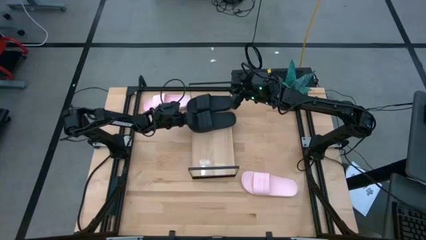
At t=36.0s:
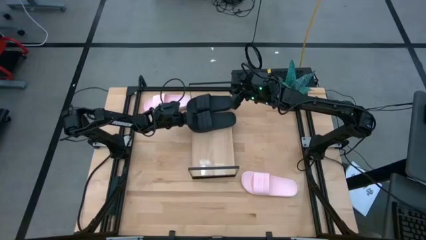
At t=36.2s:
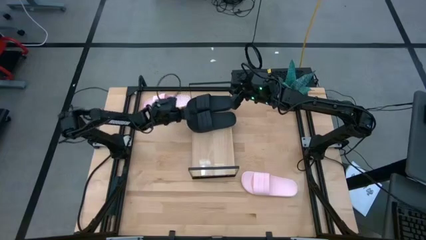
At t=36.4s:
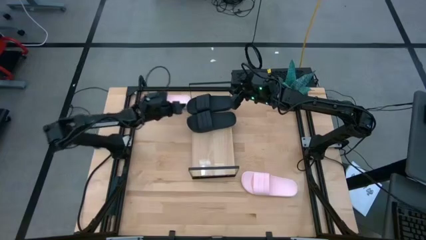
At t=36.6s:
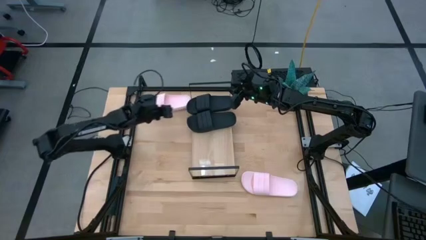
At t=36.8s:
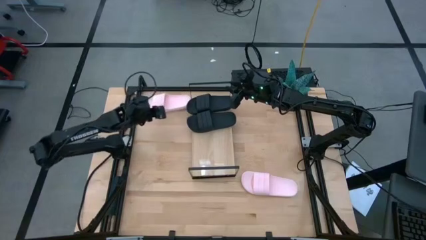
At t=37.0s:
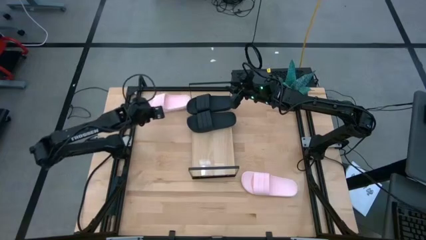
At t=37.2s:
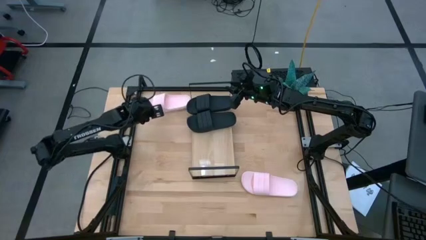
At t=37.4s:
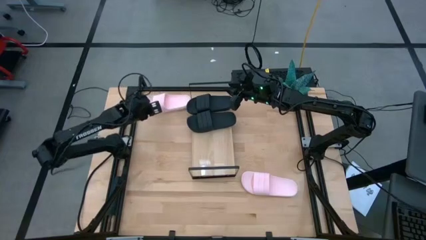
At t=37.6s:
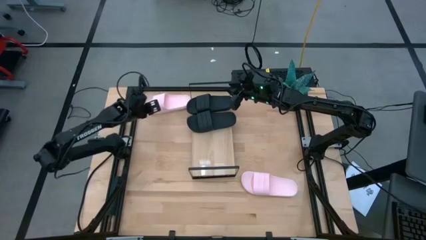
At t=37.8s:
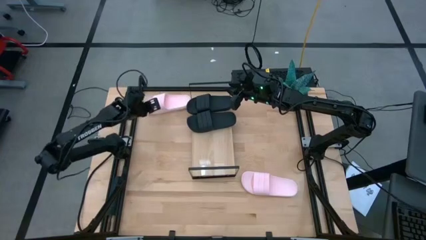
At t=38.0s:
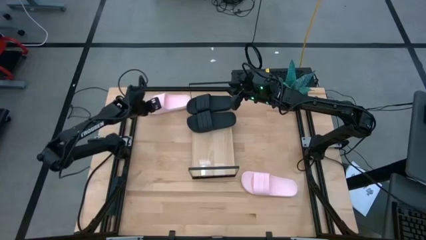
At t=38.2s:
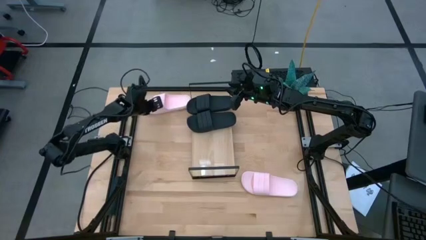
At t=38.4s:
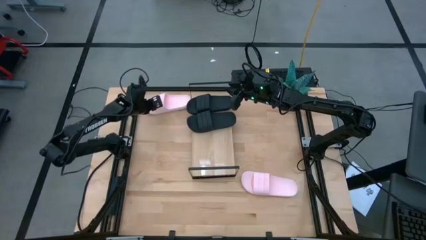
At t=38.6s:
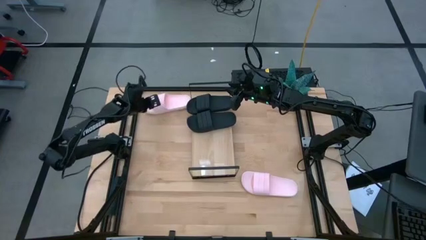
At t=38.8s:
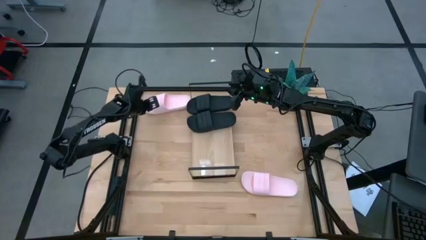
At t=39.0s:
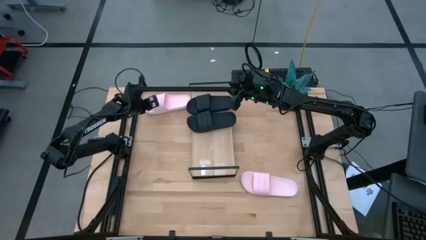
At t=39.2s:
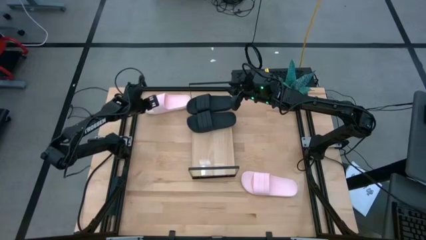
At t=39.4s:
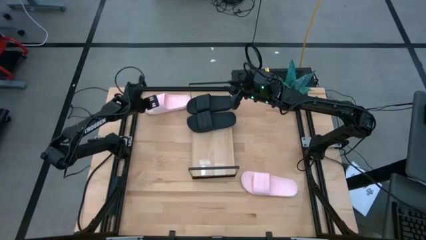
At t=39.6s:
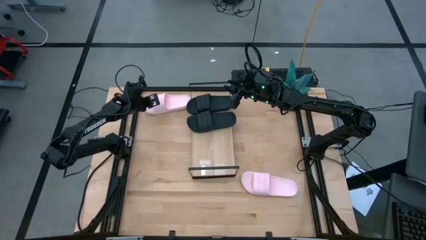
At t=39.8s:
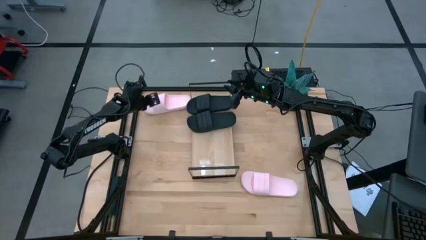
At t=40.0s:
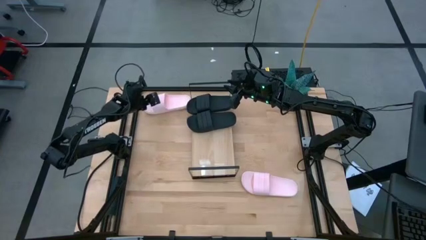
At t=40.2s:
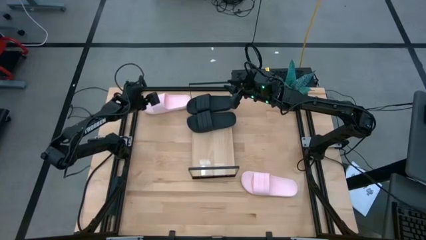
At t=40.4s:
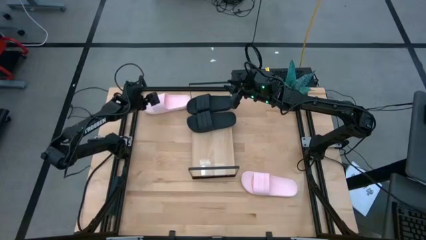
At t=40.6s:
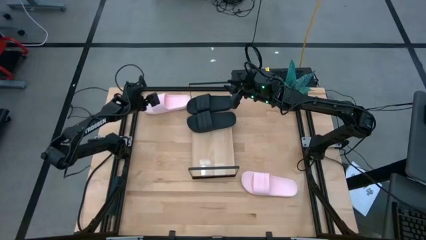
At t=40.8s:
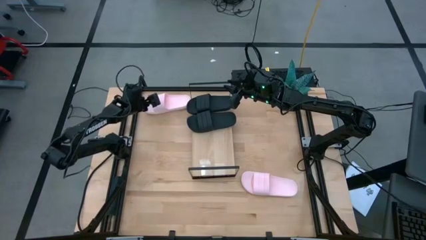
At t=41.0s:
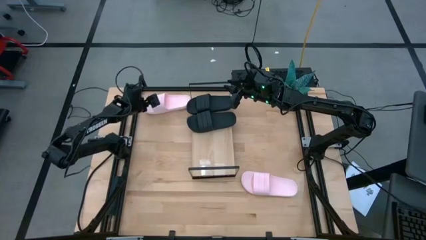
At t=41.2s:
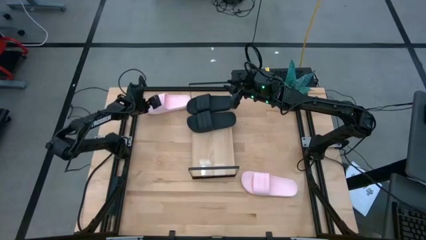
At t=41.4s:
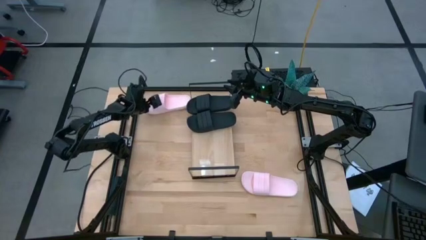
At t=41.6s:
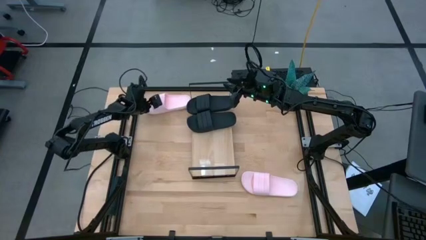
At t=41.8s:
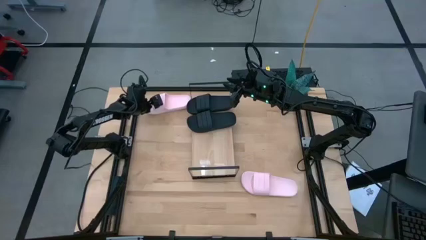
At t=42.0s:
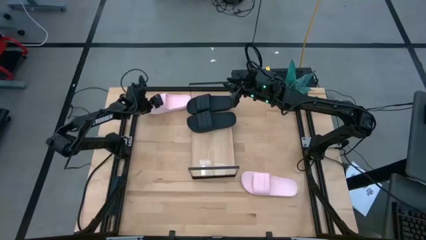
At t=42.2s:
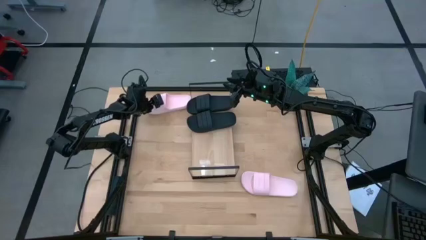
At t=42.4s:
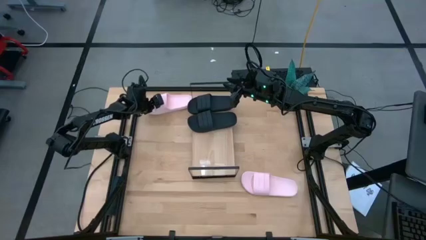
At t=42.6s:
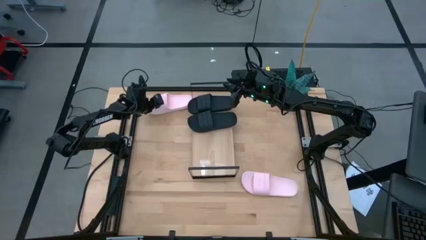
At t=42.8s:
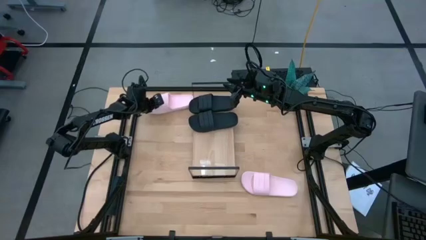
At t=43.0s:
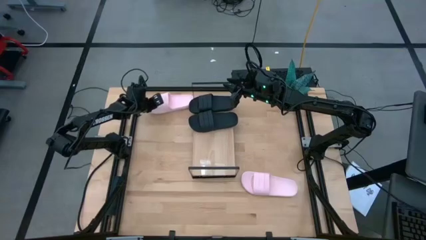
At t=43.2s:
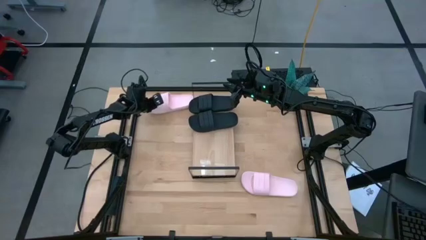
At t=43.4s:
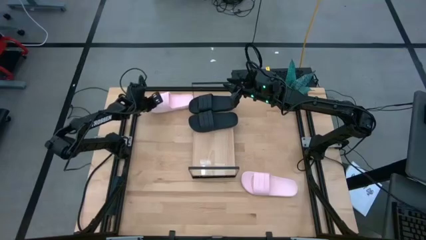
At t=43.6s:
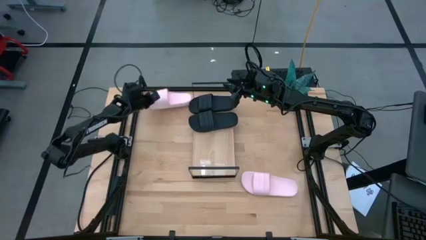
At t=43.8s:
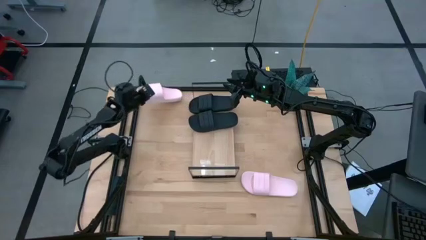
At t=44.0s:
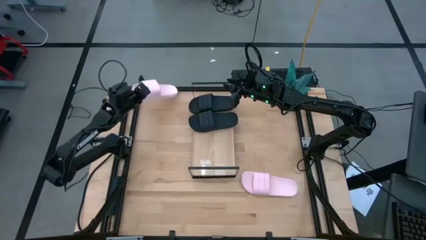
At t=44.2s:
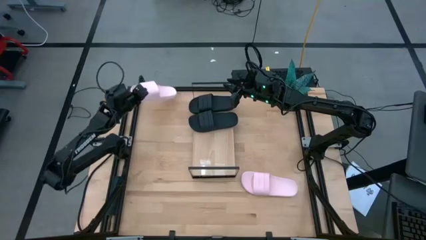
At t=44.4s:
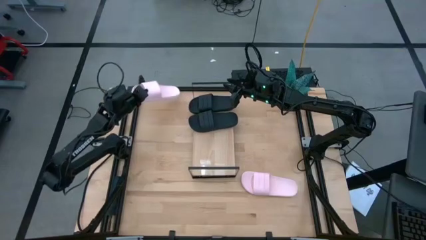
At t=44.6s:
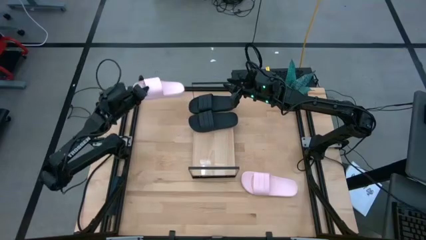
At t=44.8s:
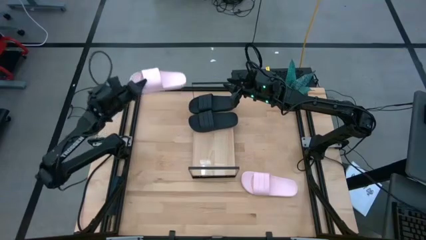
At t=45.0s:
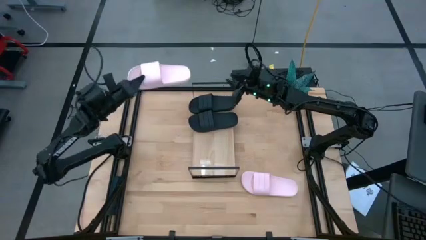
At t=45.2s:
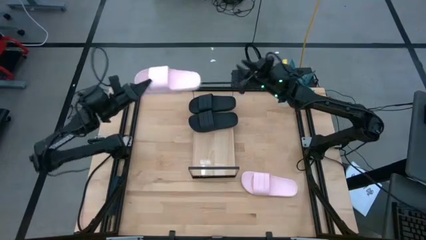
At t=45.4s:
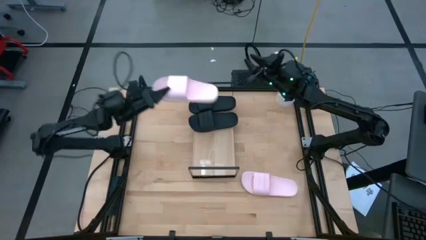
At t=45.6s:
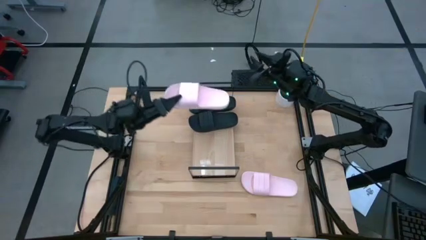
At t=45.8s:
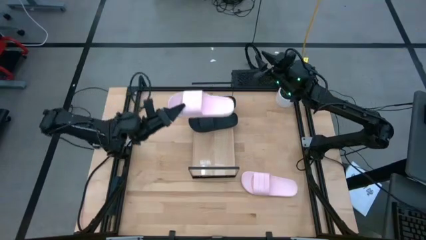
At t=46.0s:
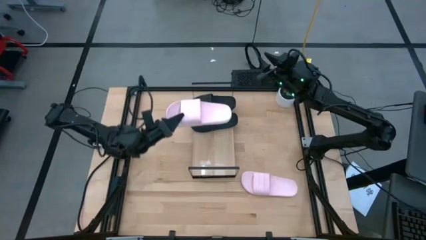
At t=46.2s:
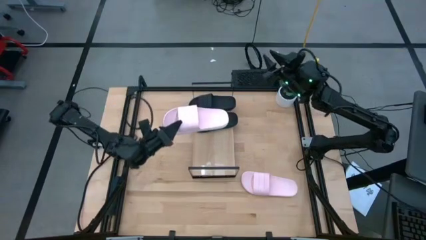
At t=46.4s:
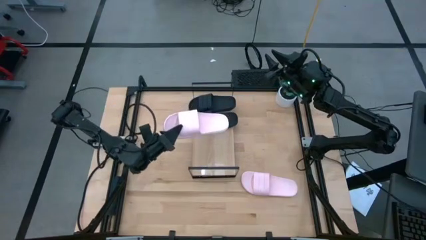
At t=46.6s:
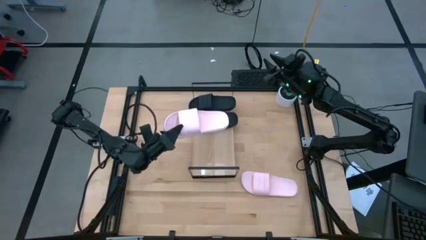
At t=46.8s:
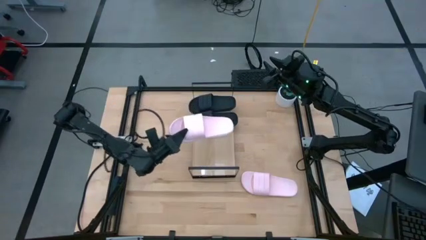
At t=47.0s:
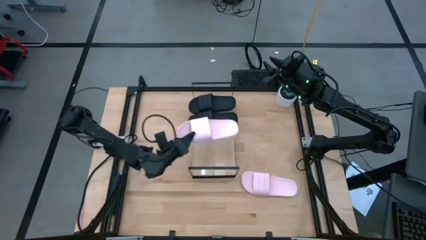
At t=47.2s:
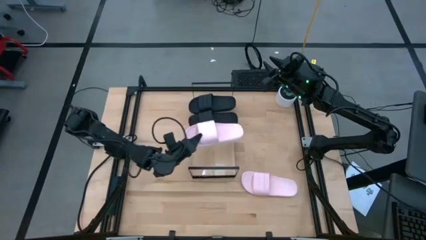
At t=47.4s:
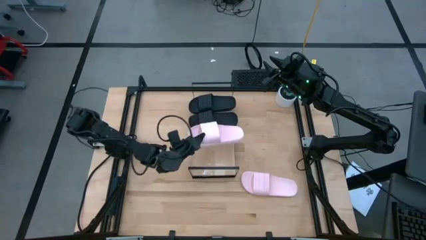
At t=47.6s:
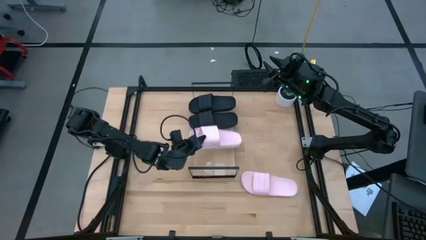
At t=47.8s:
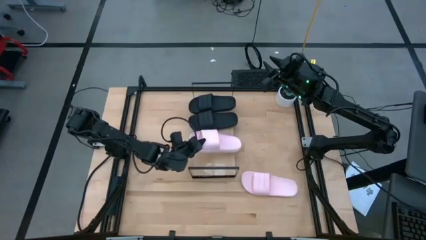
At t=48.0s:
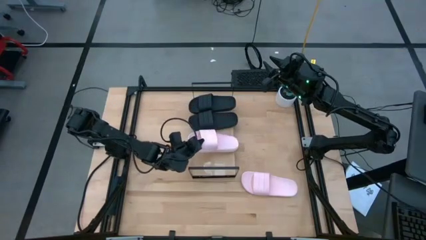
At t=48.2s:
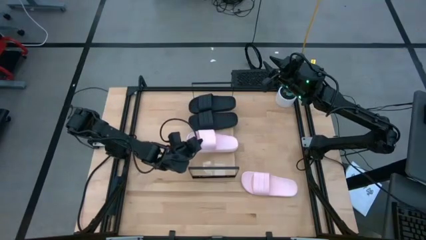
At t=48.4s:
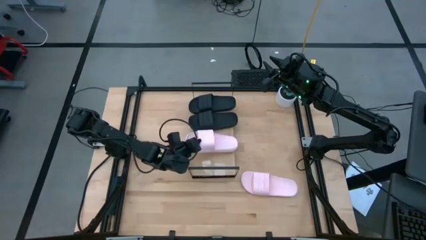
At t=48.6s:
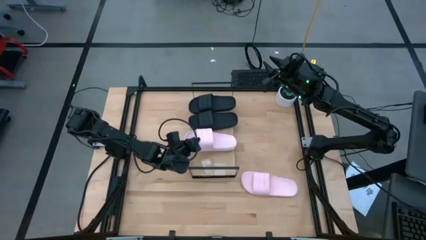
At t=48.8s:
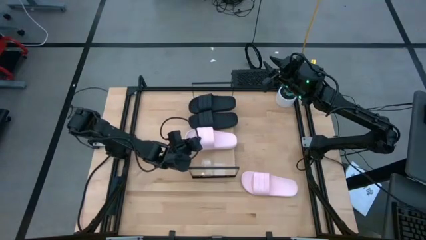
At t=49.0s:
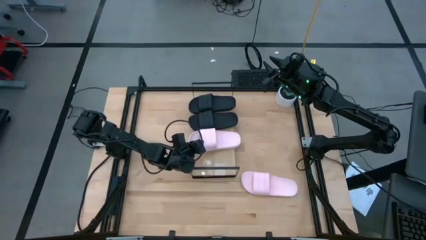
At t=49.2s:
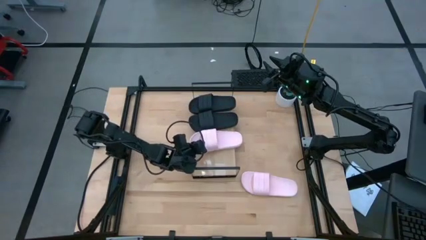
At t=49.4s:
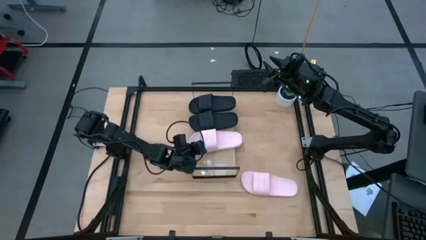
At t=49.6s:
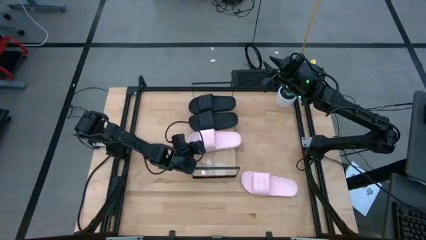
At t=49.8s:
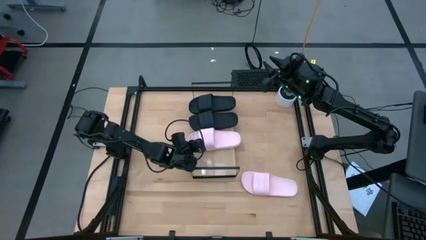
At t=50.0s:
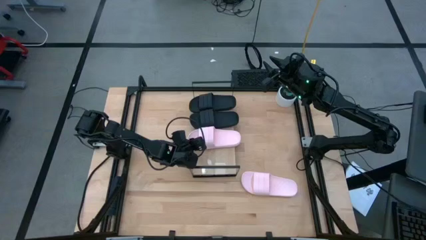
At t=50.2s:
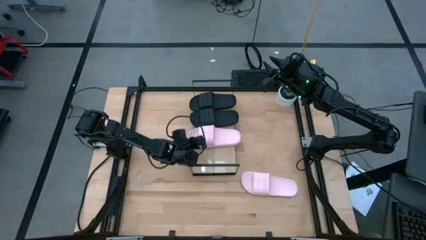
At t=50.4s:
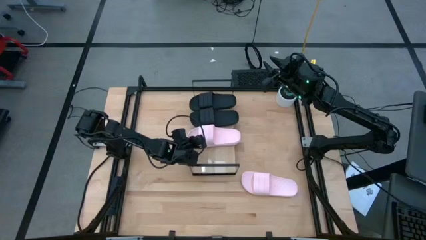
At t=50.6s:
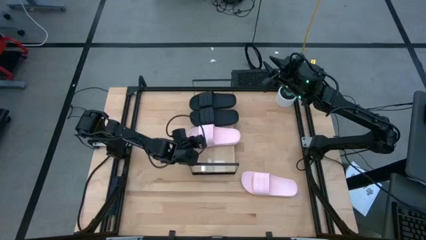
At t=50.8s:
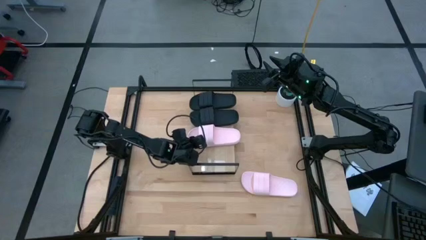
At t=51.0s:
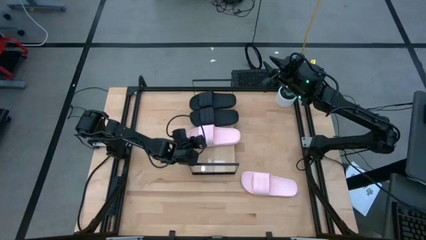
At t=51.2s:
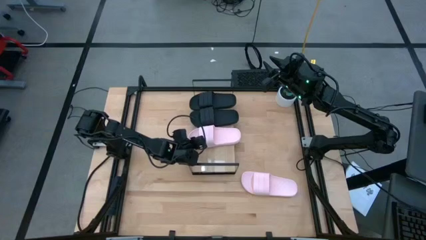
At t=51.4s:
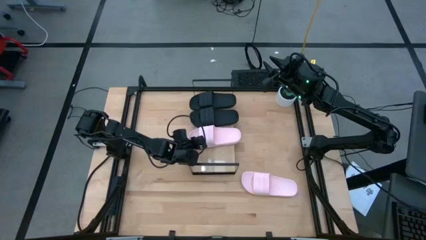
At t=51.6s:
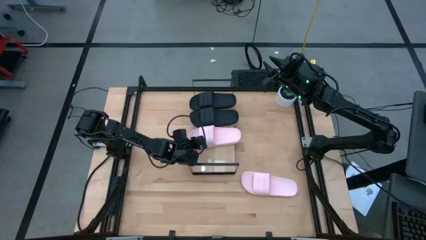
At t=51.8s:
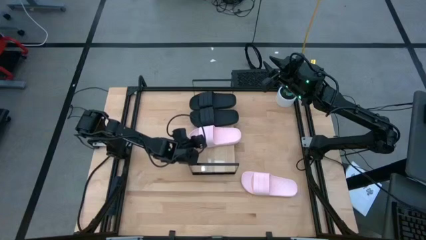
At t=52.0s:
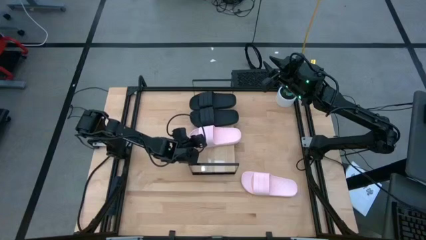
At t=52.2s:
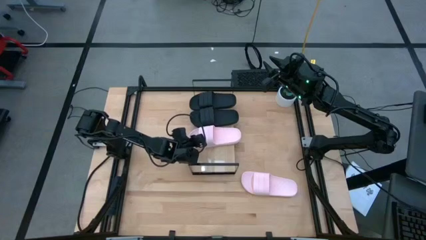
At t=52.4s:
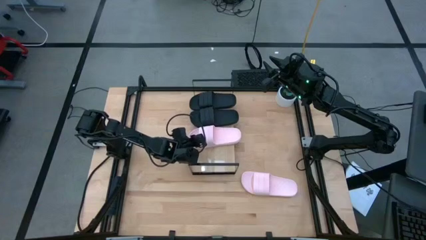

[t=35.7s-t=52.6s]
Task: Pick and place slides into the shelf
Put the top pink slipper on the shelf
